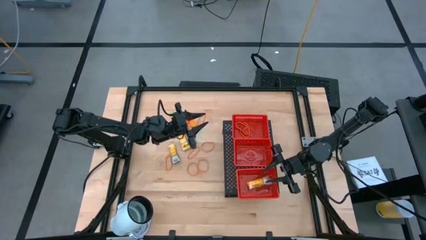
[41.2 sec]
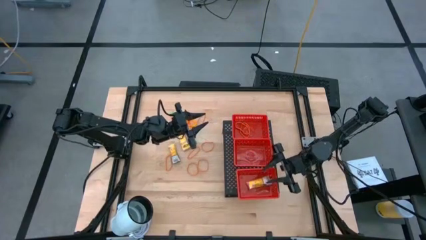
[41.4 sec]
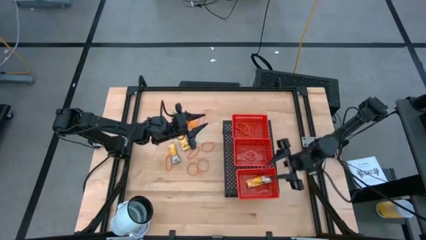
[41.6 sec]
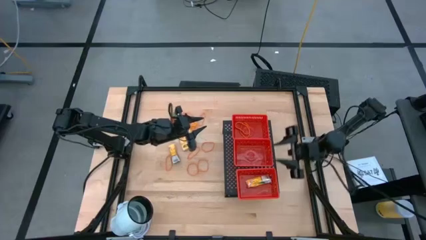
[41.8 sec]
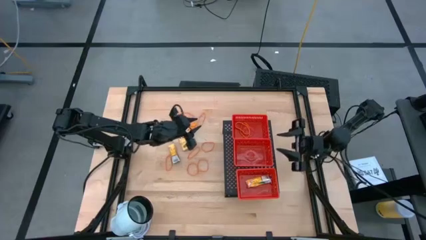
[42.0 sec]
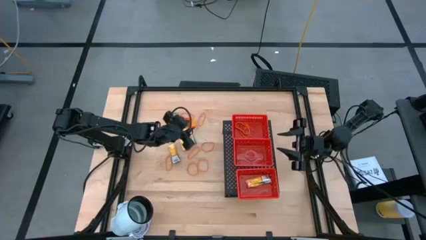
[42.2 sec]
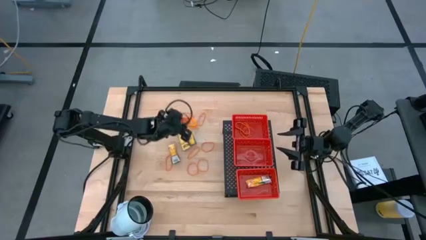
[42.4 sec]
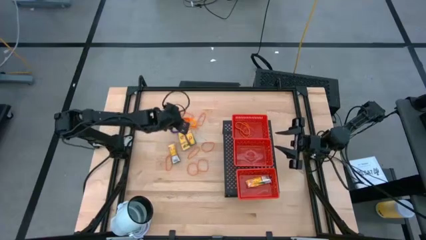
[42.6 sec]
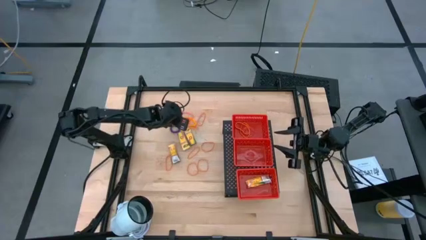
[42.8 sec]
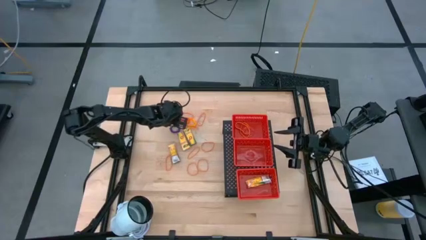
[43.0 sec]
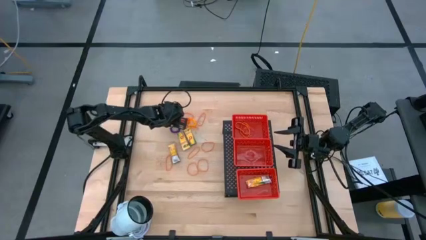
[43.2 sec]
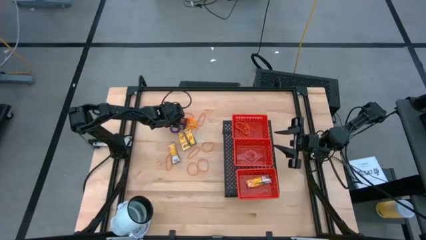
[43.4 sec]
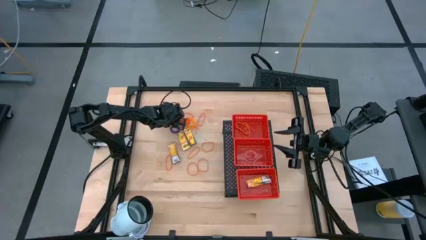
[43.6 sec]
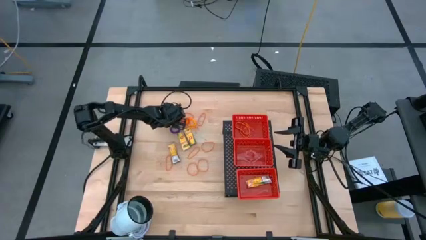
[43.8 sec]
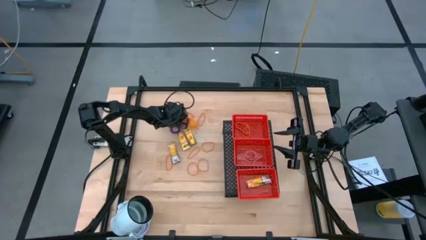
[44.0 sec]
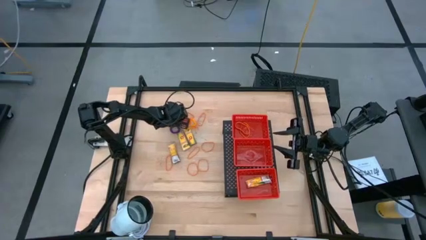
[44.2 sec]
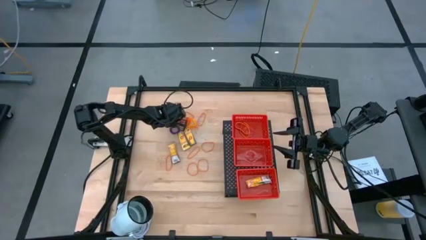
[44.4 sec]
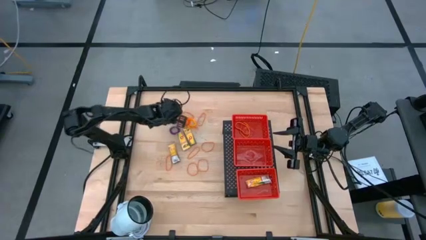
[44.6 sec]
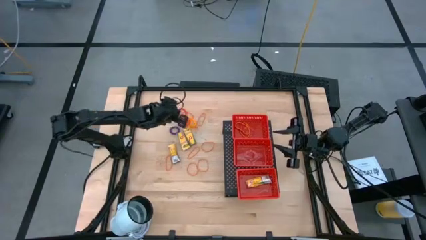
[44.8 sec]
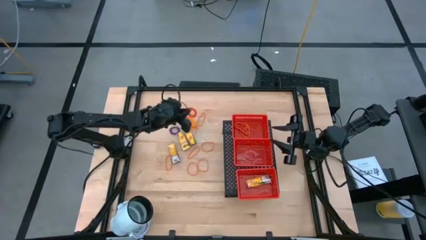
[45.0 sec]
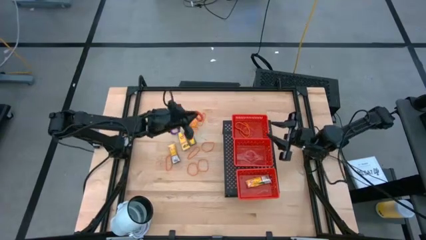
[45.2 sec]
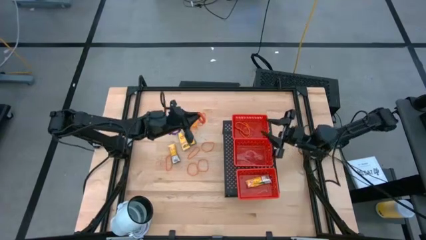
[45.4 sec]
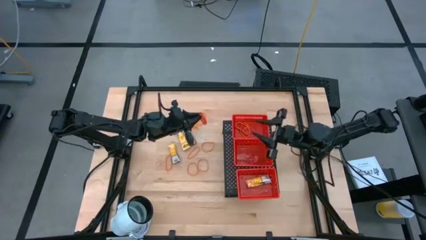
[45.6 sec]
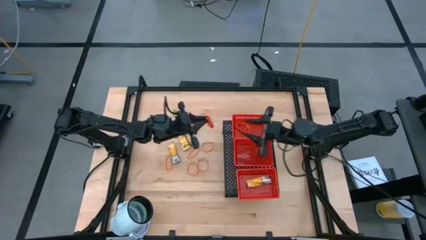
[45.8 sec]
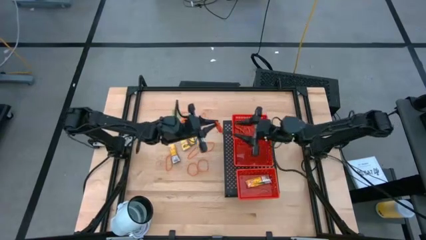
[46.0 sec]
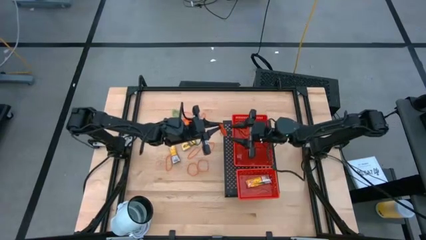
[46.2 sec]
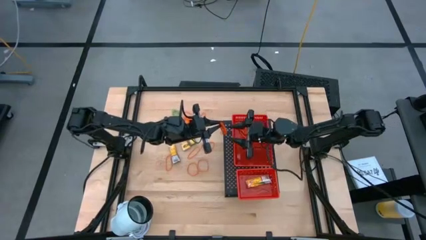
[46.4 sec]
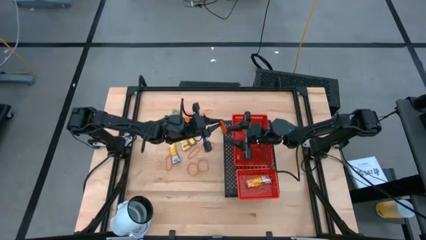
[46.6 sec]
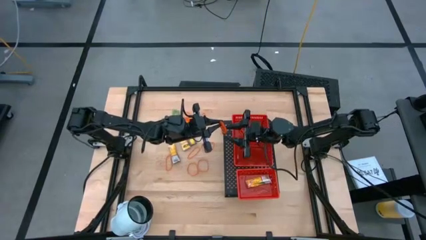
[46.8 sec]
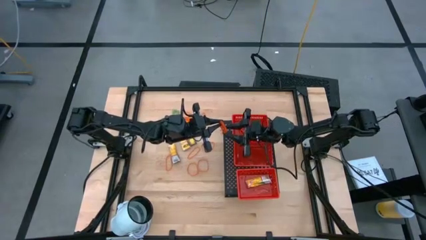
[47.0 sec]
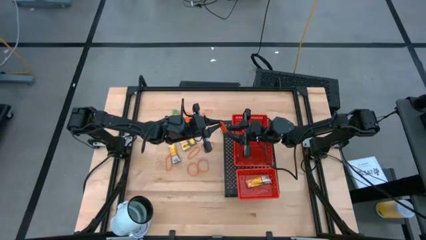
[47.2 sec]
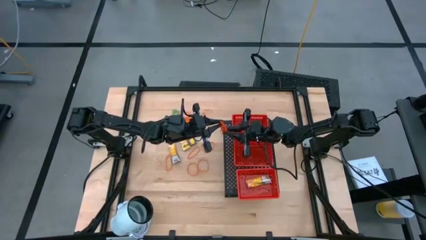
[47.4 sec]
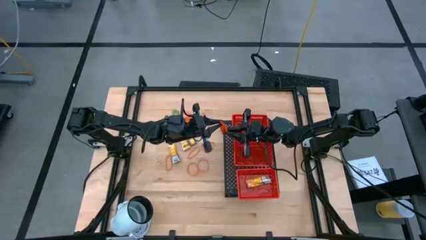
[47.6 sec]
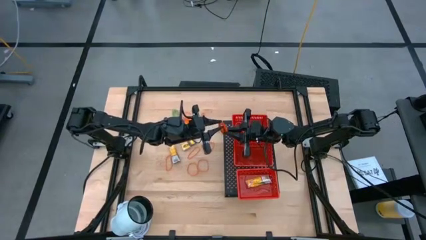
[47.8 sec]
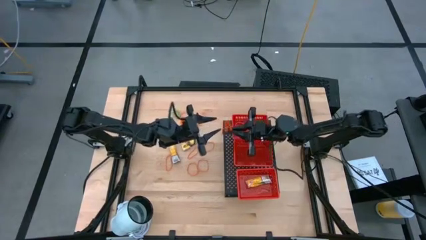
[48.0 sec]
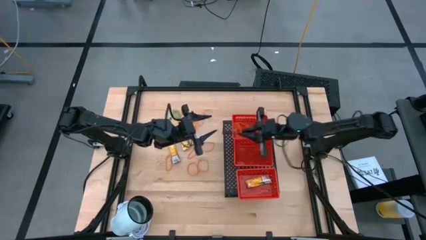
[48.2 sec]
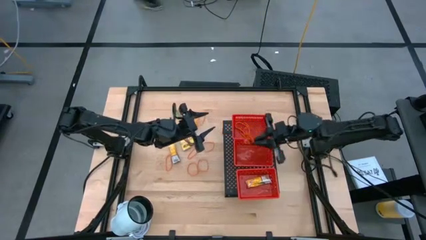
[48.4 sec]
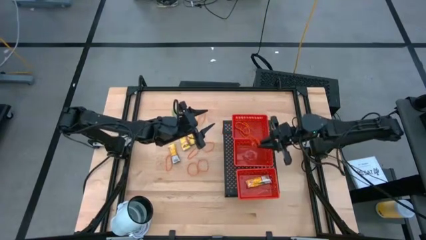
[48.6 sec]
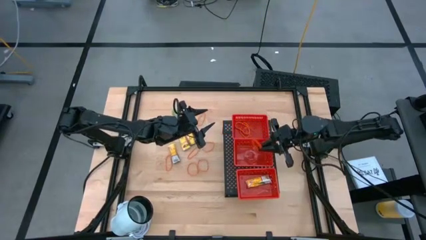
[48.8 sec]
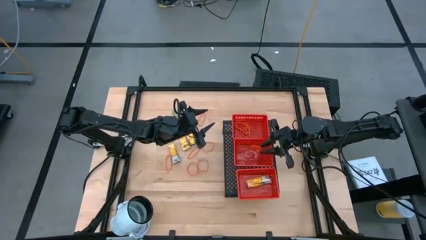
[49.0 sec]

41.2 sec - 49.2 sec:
Task: Pick & Place Office Desk Supplies
Put the orange spring keychain into the middle red bin on the shelf

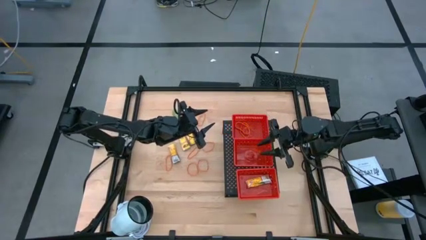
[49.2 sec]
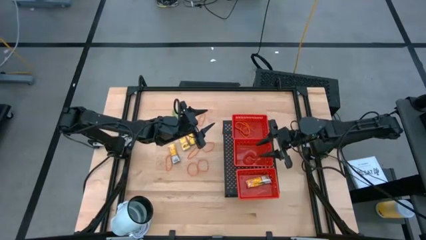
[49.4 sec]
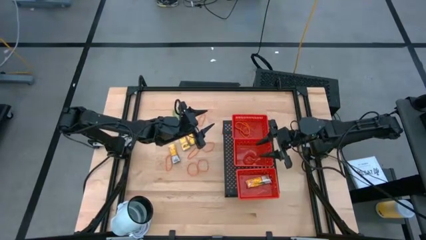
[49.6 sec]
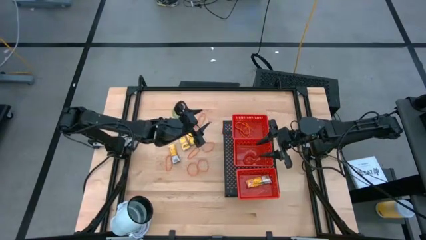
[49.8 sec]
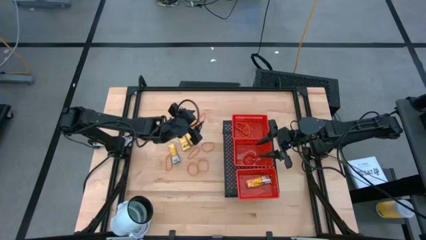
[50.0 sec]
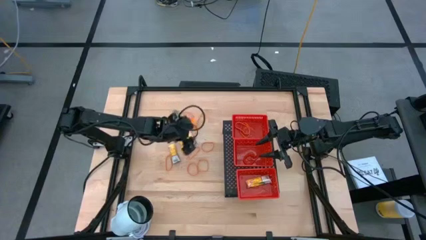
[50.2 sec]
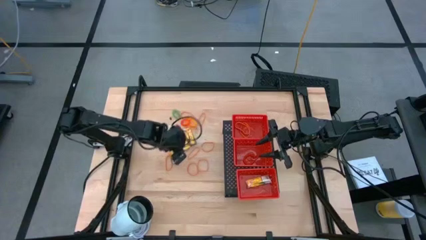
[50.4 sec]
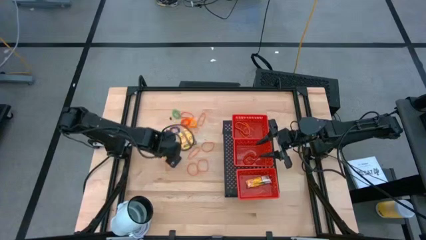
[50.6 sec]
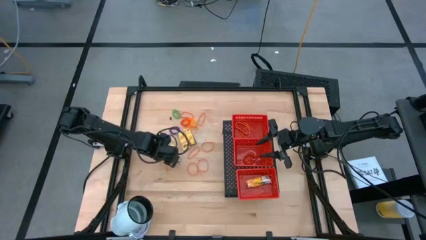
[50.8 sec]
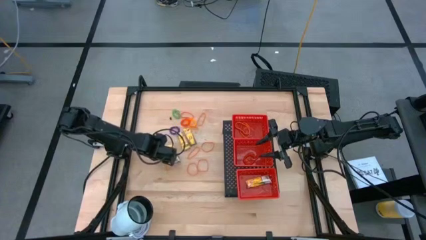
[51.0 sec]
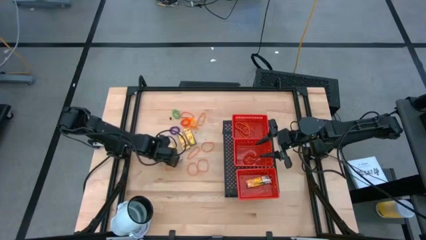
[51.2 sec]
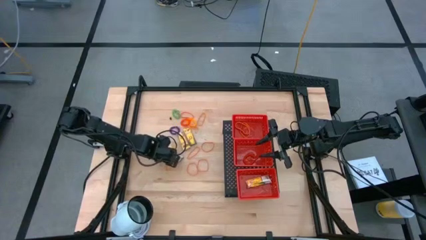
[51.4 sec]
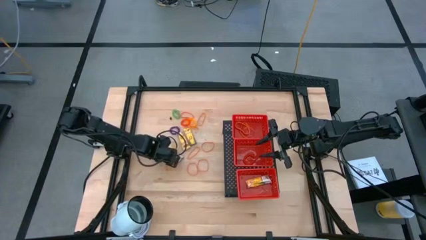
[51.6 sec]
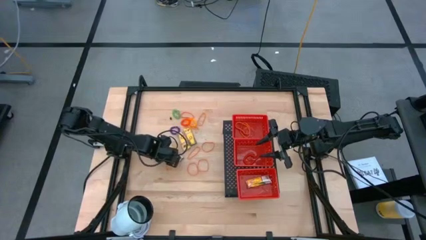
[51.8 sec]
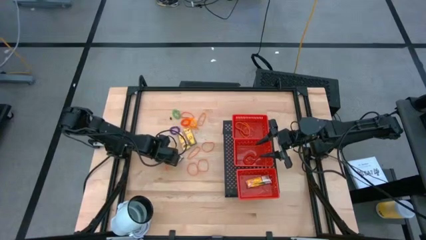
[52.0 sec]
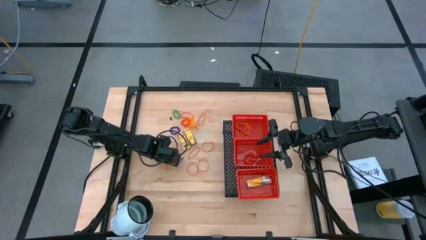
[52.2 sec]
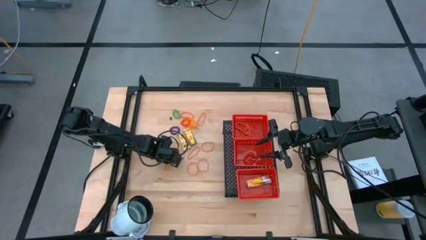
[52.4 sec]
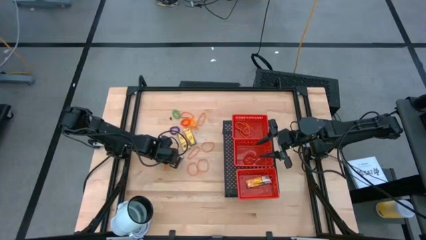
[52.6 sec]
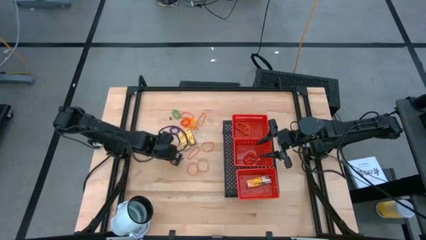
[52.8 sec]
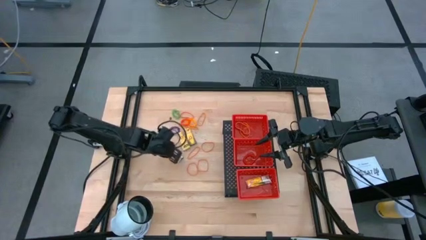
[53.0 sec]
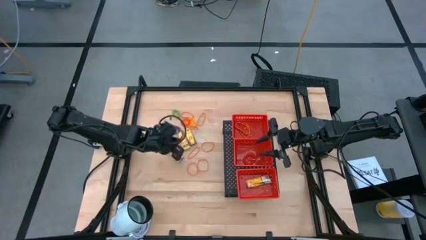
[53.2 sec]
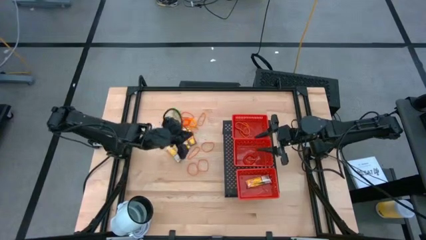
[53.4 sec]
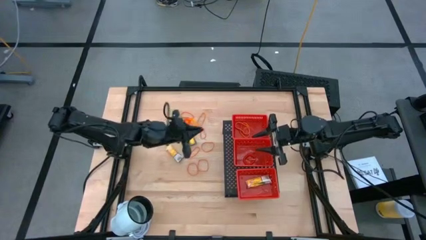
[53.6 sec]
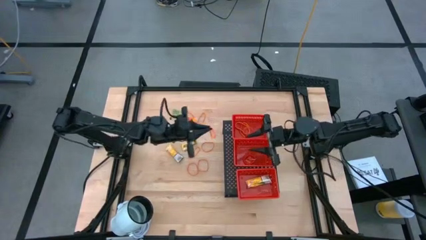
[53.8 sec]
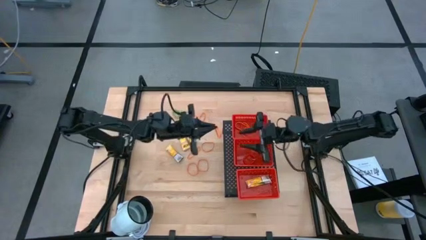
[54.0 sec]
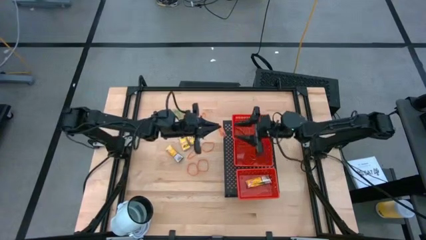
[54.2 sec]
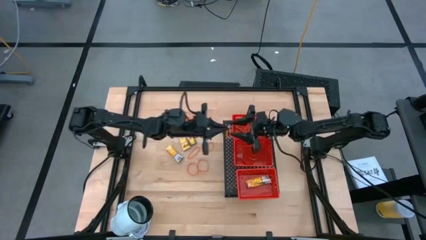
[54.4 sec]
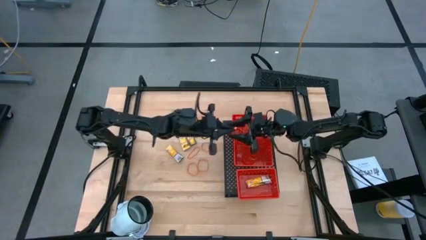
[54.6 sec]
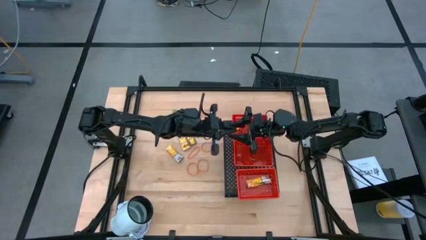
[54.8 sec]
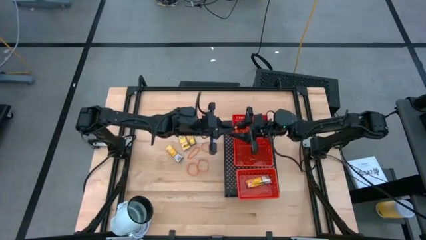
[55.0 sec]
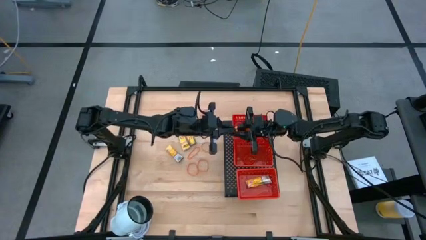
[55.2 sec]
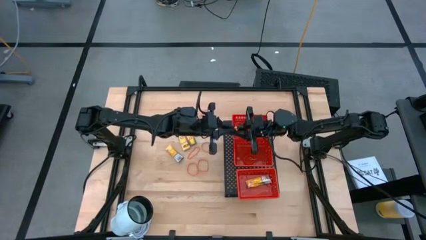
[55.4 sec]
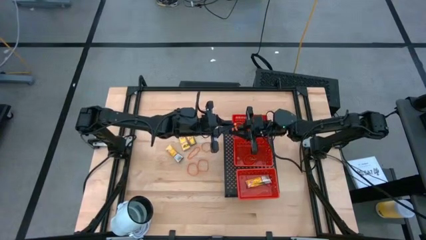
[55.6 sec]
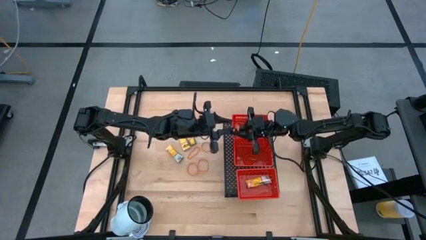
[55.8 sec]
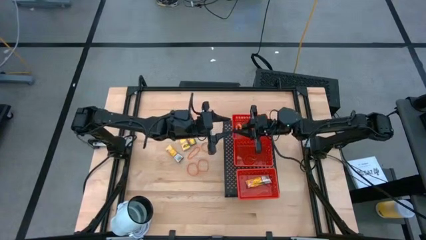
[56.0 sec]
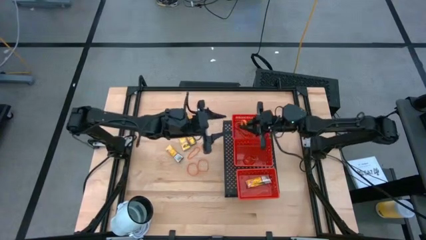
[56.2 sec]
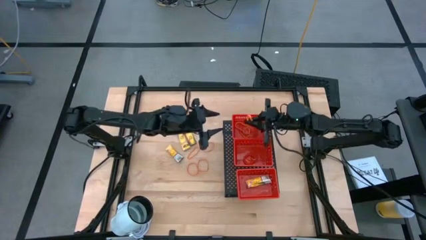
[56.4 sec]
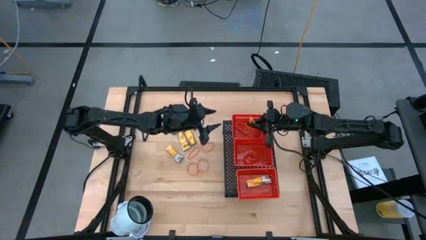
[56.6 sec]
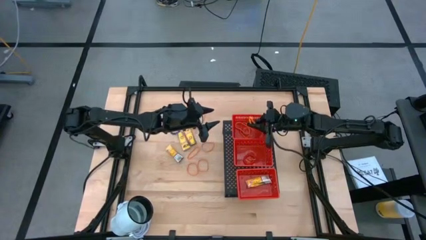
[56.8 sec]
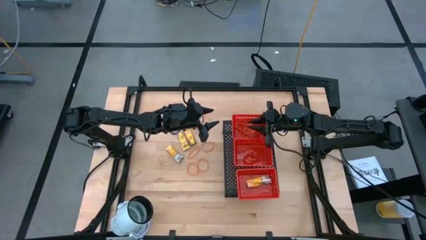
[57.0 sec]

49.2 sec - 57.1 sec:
Put the orange rubber band into the top red bin on the shelf

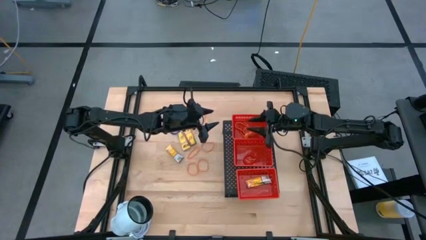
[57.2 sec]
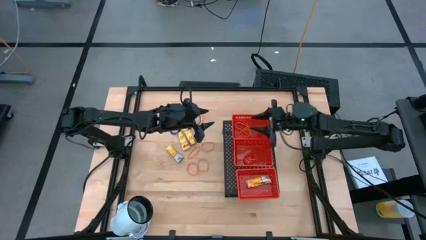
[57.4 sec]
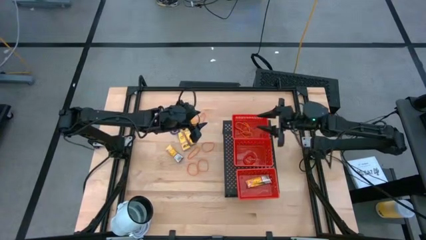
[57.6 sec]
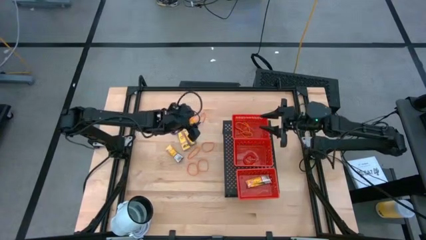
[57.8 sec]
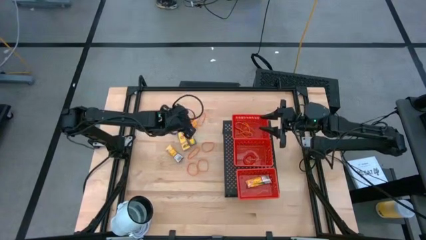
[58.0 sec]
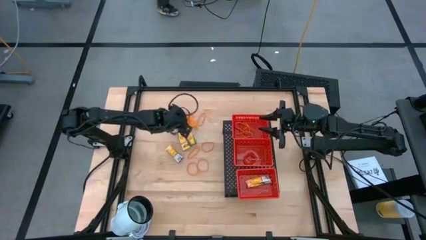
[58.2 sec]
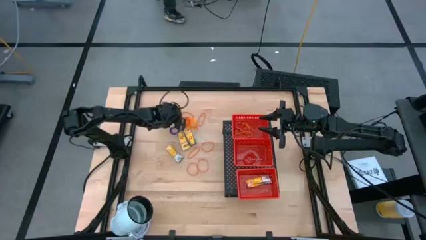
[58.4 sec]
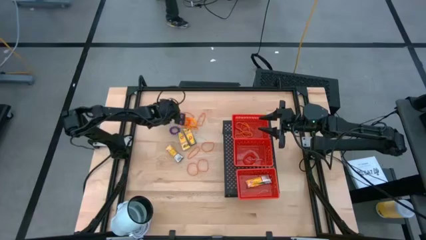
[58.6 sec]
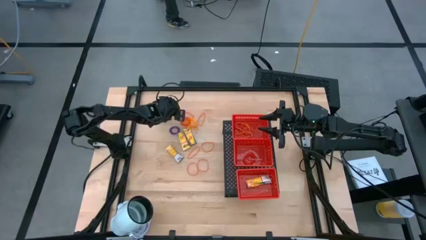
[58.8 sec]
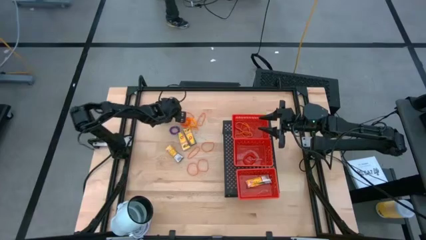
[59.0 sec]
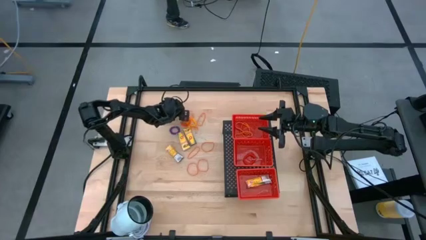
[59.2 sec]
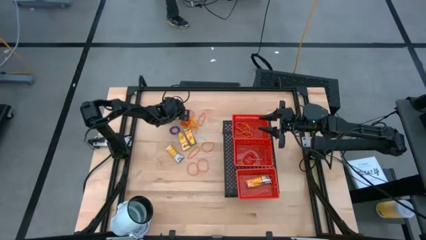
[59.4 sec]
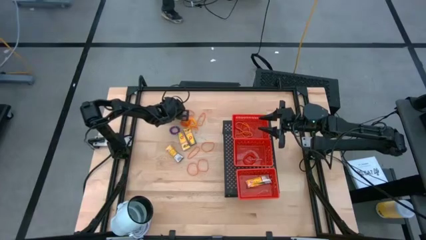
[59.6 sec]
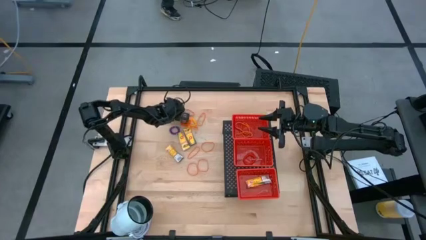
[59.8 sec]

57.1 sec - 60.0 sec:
Put the green spring keychain into the middle red bin on the shelf
